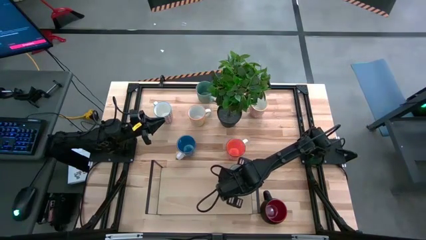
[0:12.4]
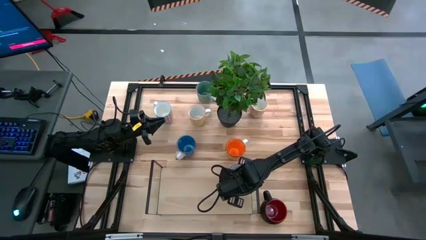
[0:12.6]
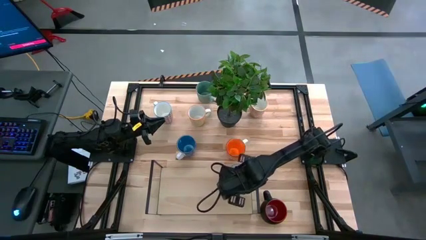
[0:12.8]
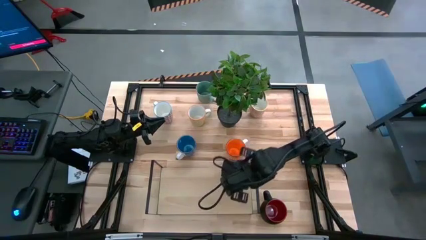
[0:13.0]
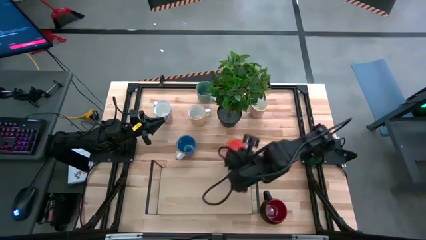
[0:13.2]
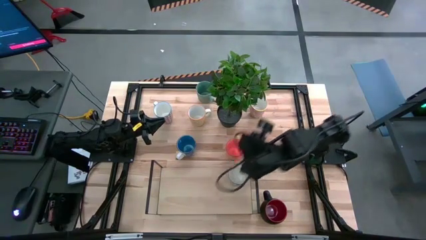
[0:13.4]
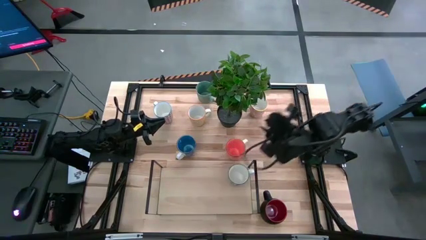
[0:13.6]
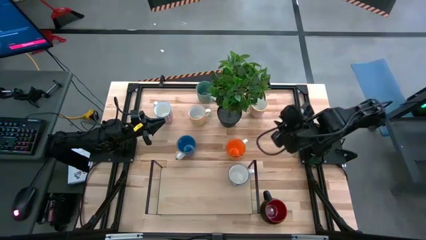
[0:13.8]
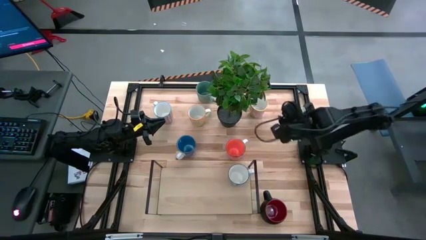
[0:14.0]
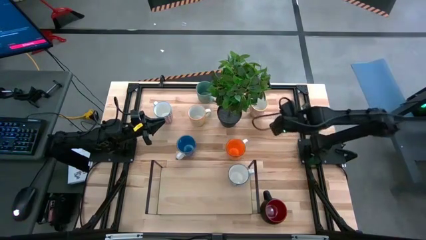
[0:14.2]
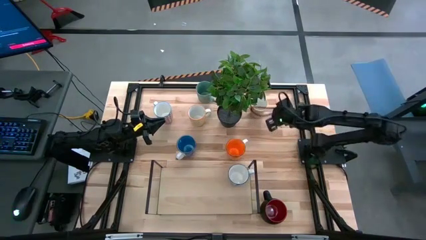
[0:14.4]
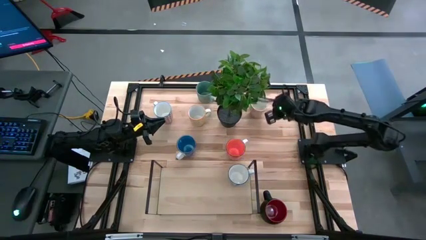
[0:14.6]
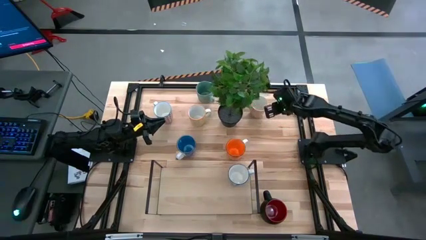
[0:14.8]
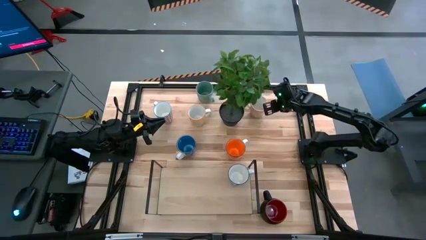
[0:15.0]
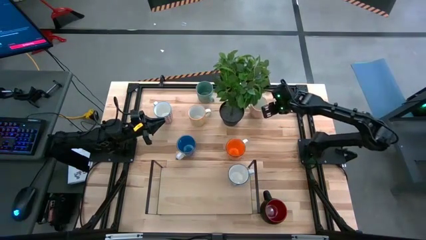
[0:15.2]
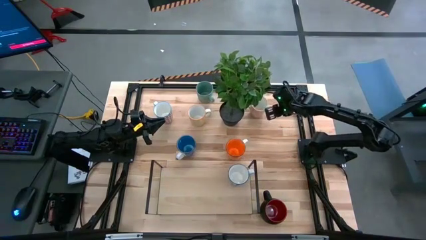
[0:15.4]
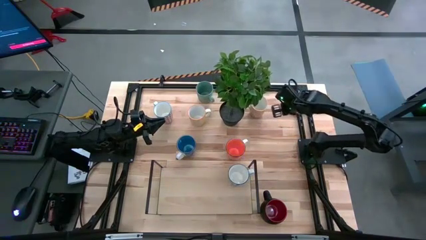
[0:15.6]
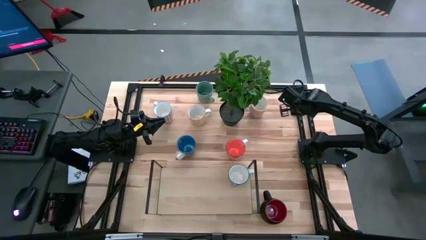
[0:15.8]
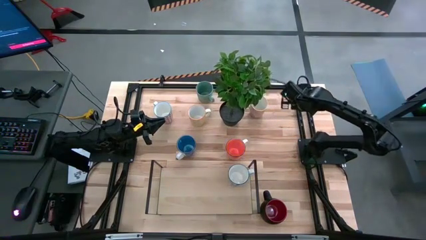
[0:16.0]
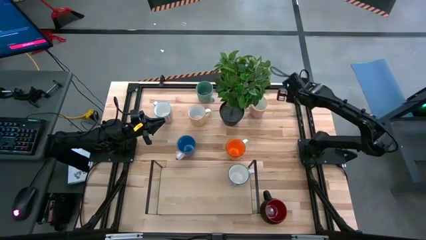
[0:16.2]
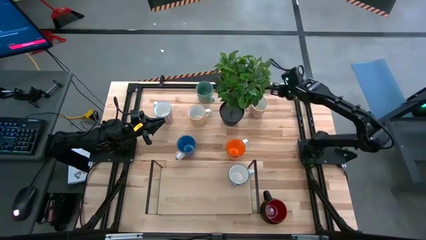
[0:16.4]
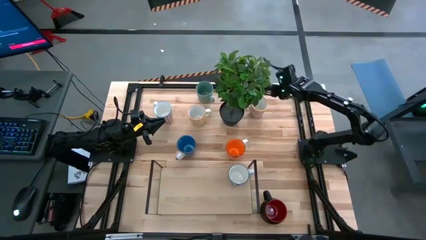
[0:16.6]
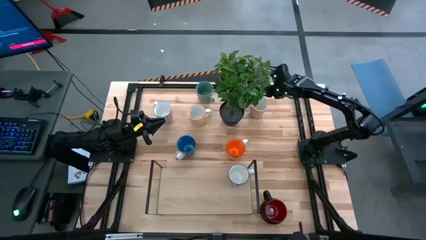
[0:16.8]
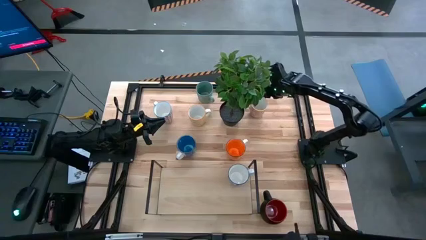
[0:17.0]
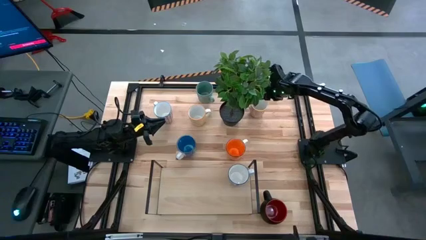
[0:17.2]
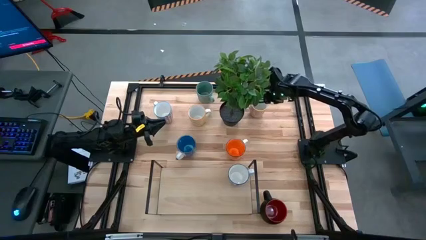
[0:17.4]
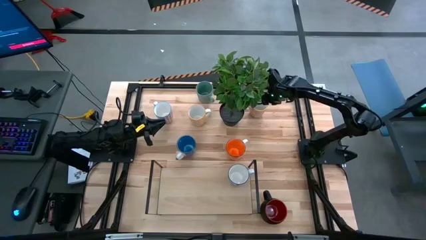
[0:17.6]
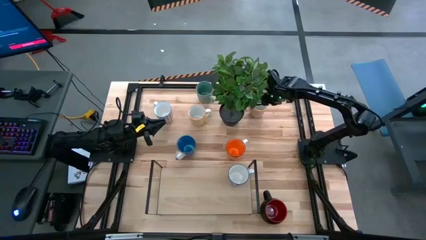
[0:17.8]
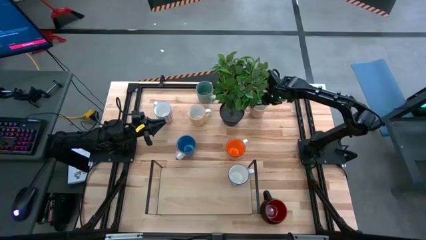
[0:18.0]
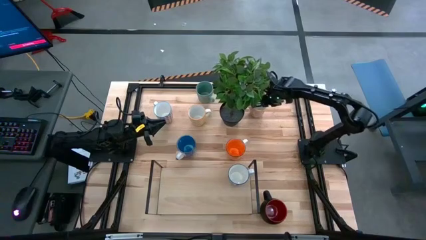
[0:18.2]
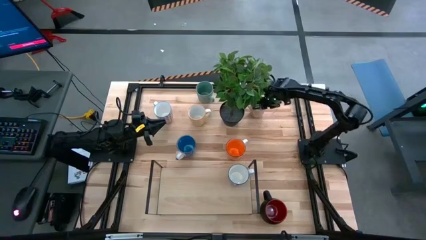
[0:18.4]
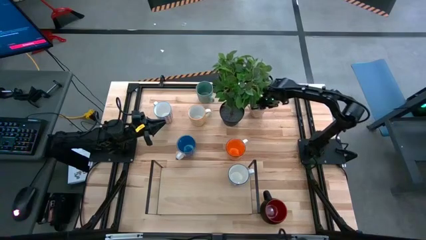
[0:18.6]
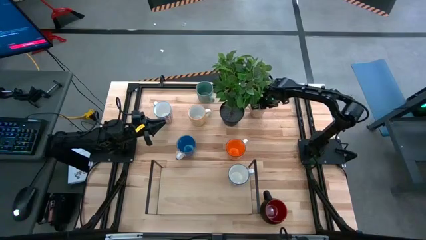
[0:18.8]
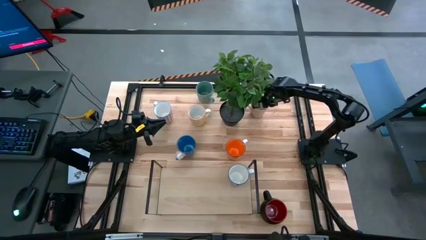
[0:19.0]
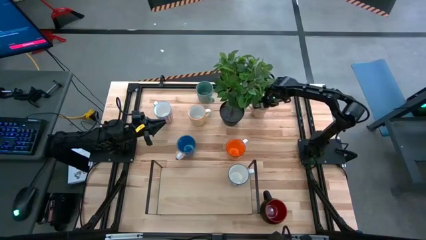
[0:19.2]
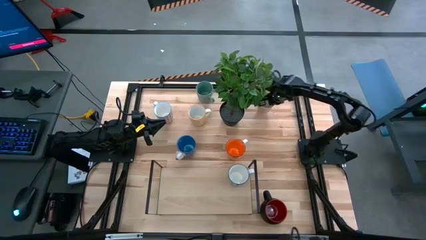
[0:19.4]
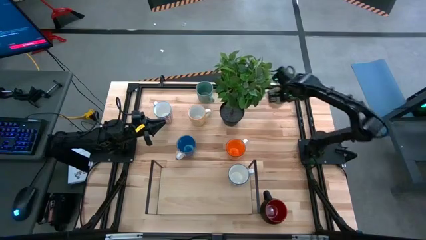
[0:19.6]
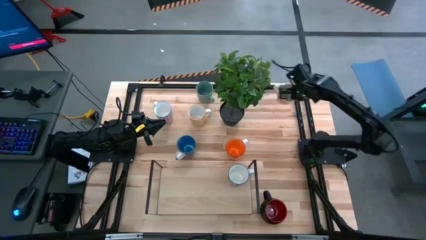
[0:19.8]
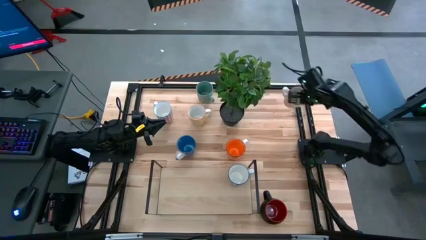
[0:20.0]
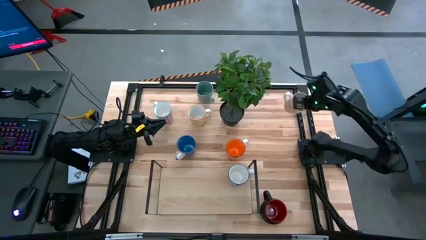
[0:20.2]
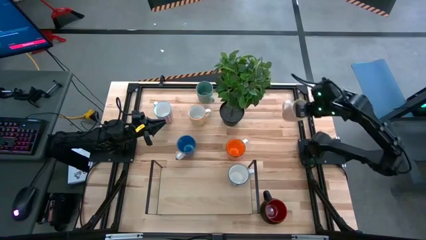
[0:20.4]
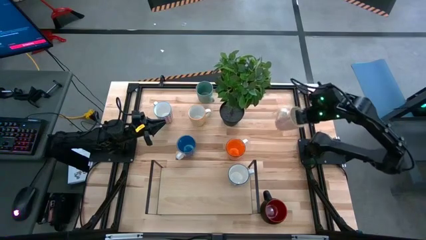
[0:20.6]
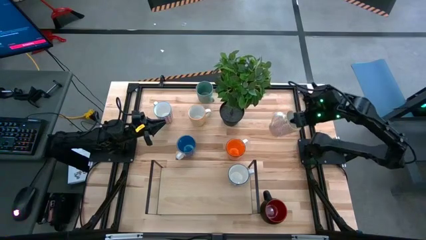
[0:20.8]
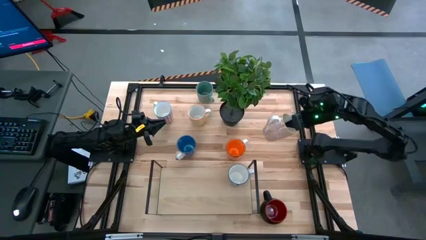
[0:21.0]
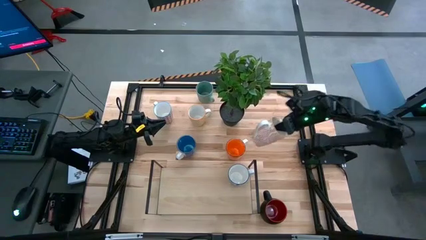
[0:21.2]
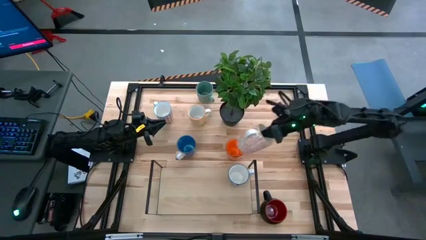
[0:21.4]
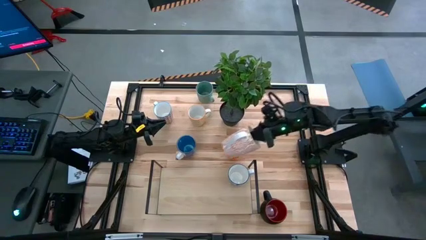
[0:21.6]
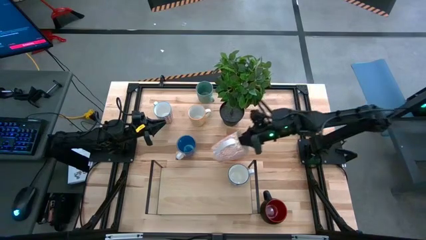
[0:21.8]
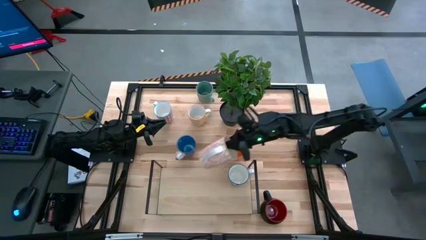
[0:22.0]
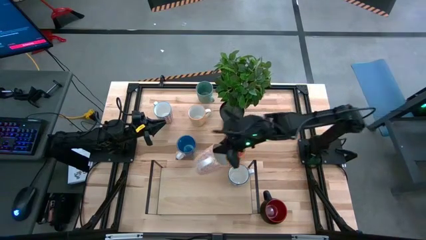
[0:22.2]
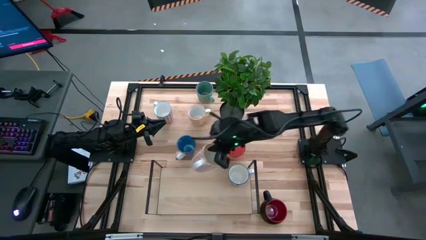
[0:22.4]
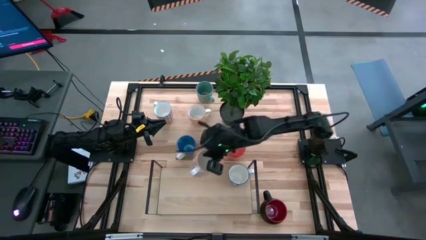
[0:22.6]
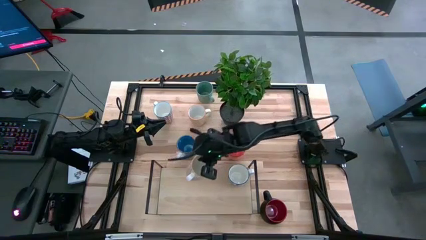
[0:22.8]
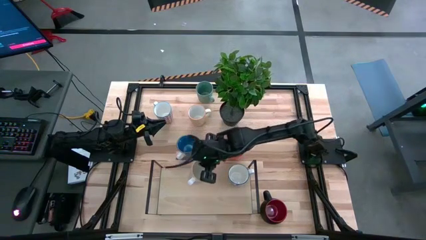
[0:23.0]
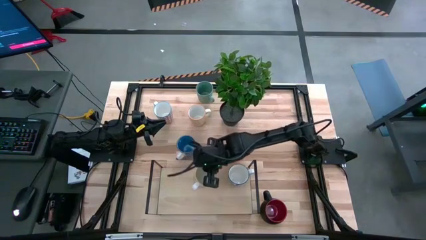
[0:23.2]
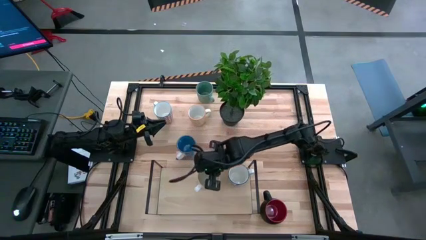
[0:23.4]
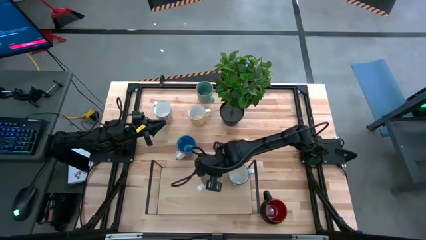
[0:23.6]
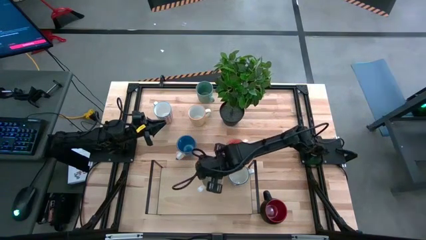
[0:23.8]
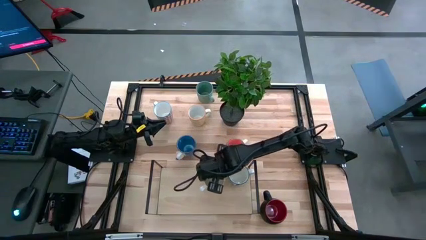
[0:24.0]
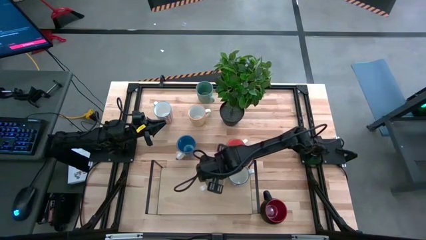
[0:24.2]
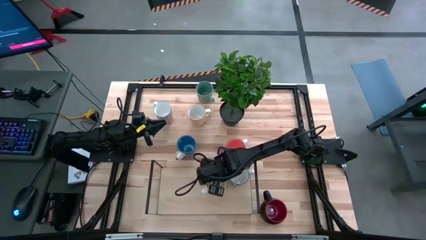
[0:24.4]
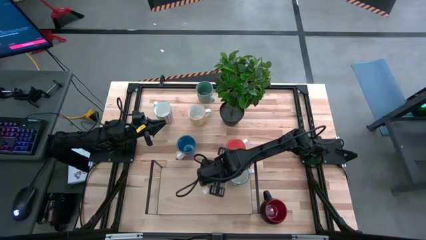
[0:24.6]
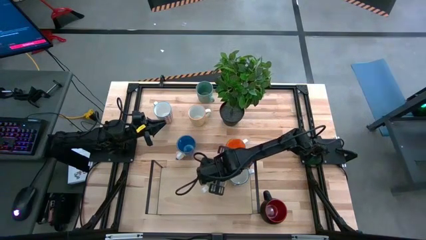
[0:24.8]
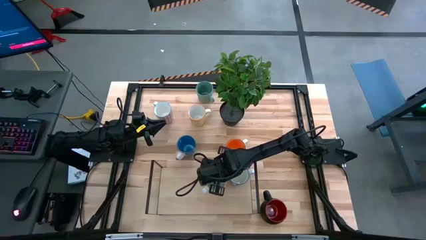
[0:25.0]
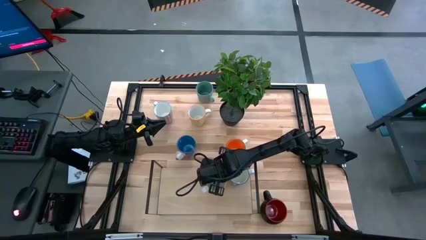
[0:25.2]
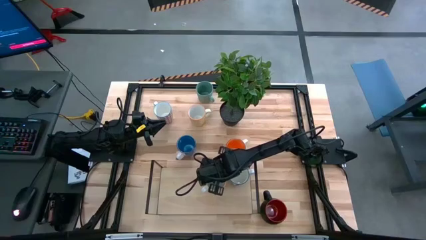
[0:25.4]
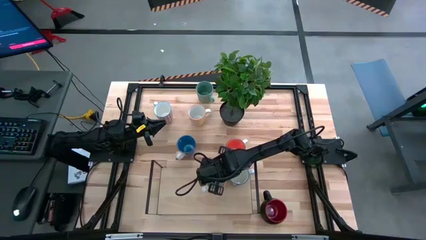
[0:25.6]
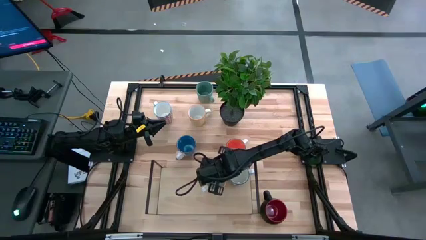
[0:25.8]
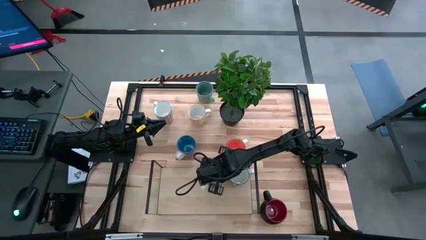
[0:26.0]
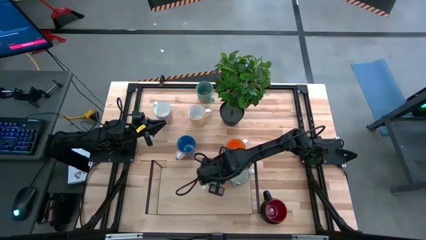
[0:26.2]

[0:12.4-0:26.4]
Task: Place coffee mugs
Put the white-orange pattern mug on the shelf

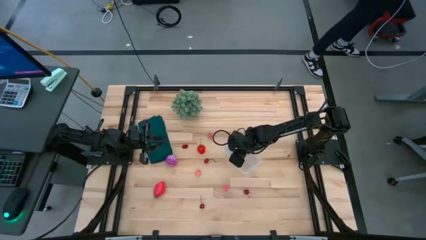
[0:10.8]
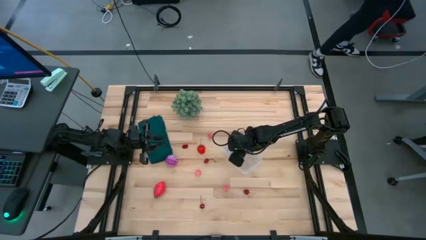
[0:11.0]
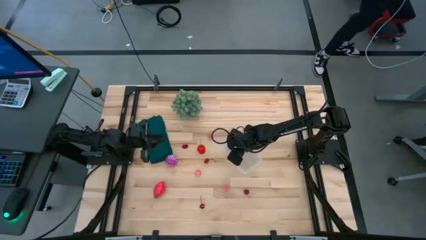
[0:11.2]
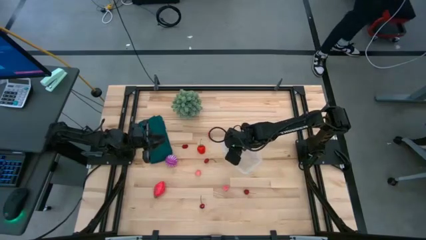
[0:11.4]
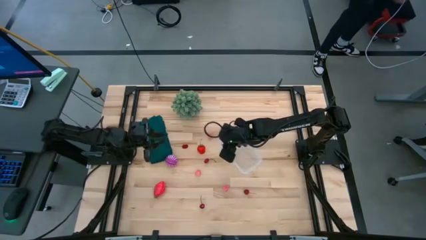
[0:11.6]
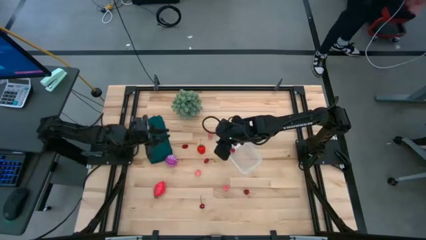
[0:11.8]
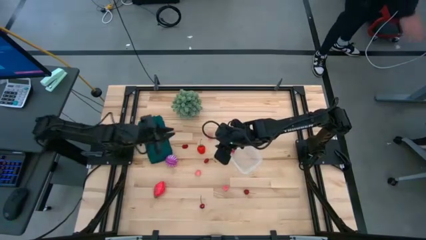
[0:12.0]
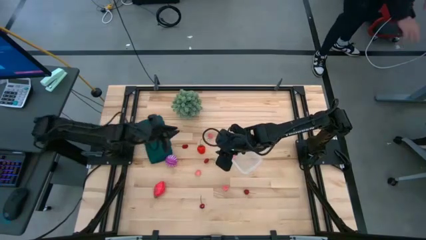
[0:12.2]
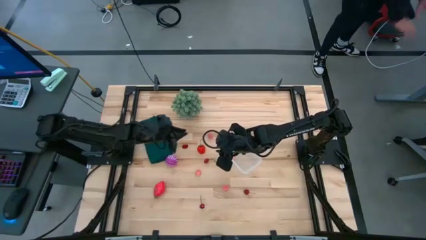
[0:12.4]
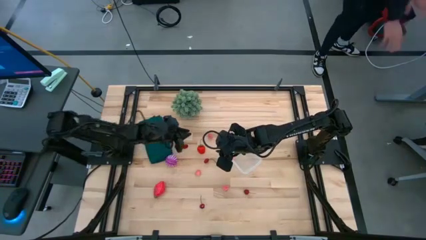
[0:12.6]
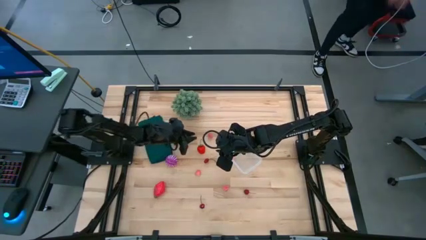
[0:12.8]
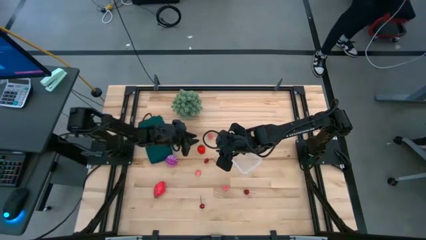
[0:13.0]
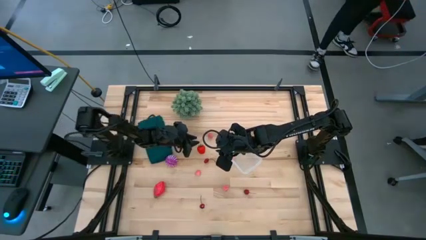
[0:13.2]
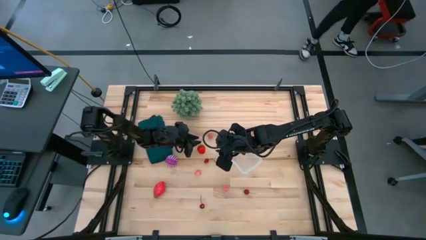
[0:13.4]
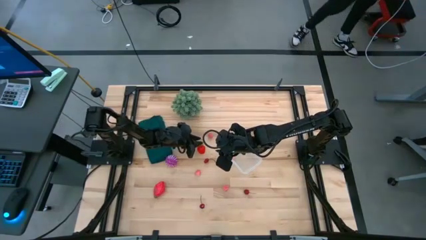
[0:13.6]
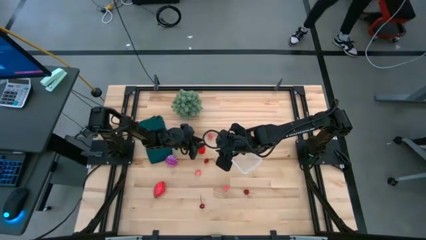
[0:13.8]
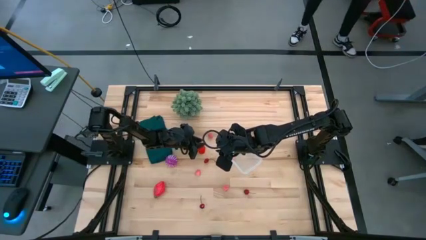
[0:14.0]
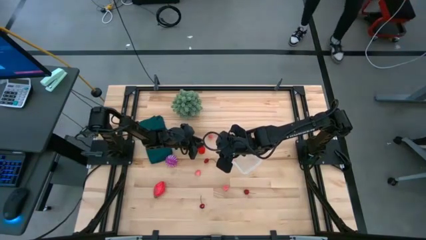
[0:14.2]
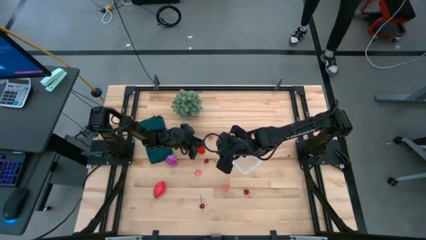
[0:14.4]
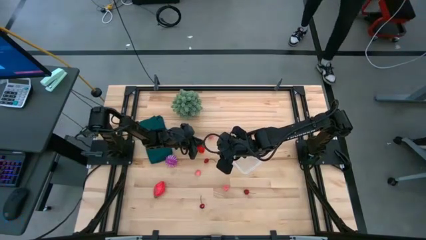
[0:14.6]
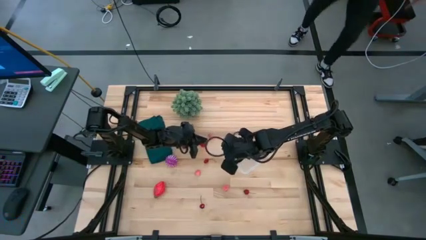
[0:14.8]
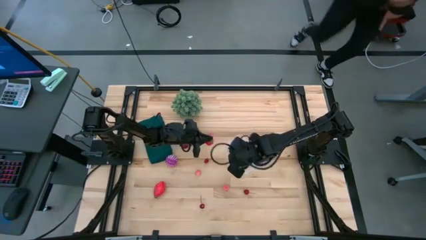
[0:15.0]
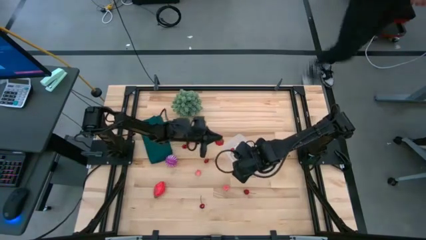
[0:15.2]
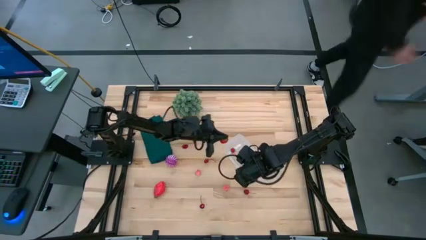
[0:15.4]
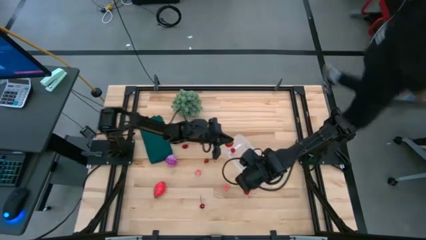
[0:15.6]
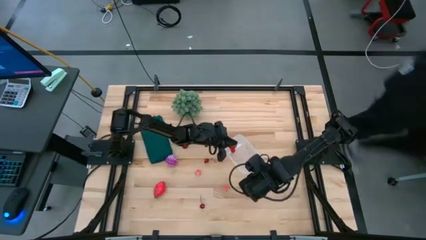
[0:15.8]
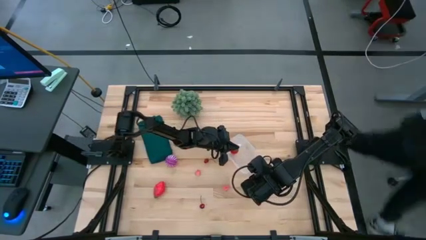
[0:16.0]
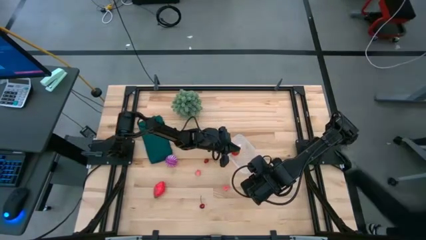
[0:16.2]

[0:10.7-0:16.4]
Task: Pick and placing Produce into tupperware
Put the strawberry into the container
